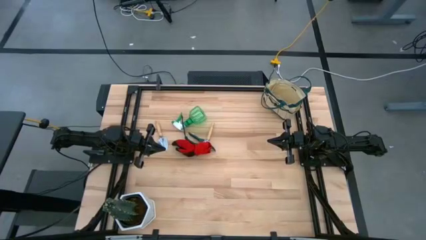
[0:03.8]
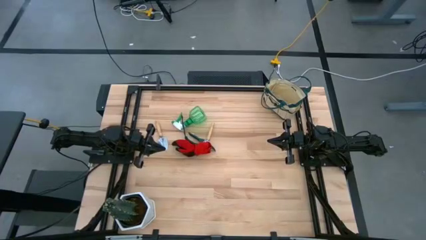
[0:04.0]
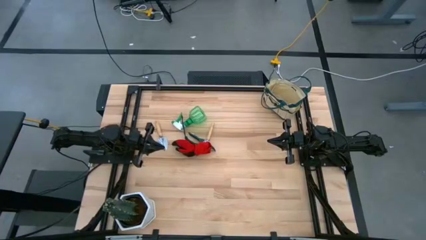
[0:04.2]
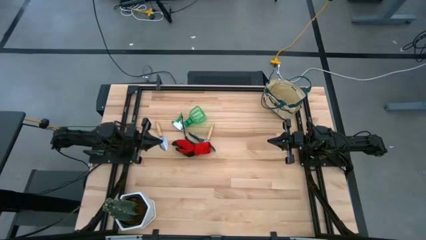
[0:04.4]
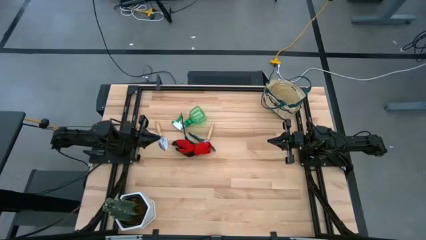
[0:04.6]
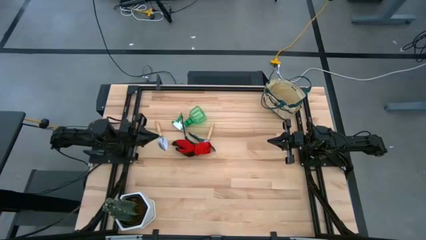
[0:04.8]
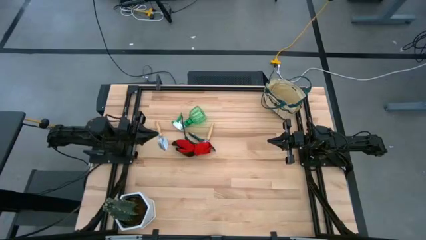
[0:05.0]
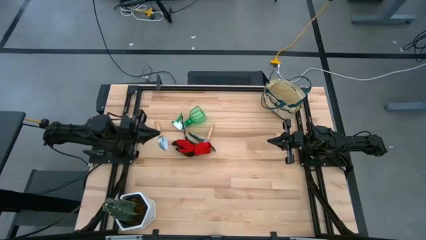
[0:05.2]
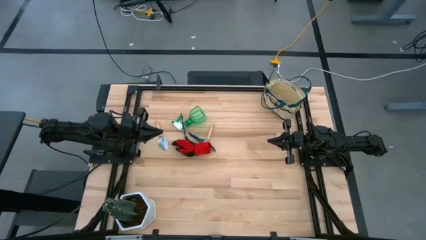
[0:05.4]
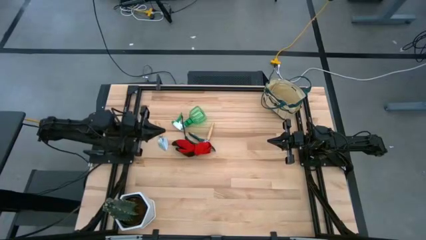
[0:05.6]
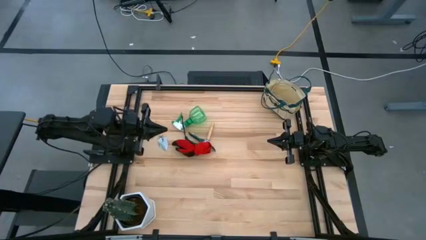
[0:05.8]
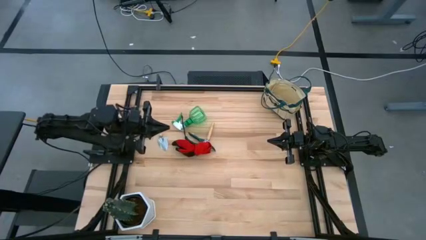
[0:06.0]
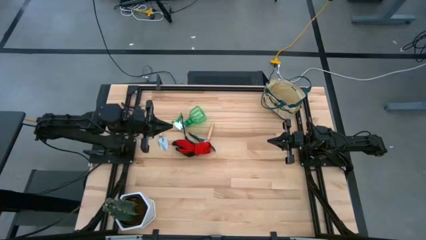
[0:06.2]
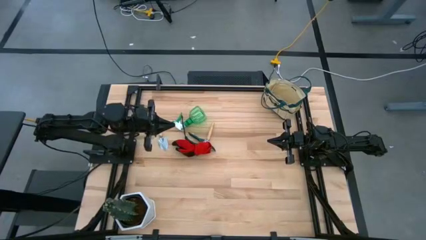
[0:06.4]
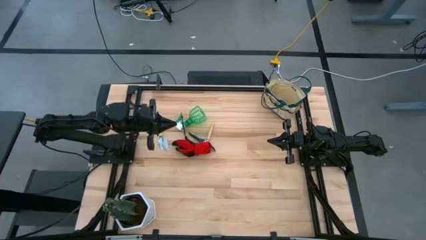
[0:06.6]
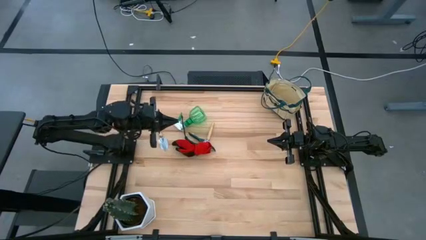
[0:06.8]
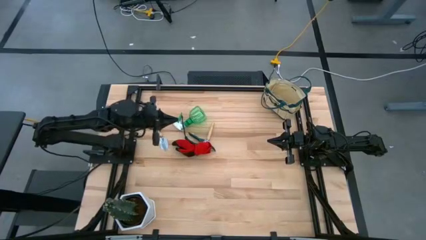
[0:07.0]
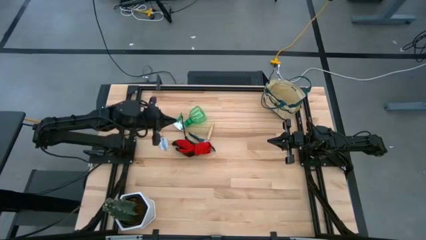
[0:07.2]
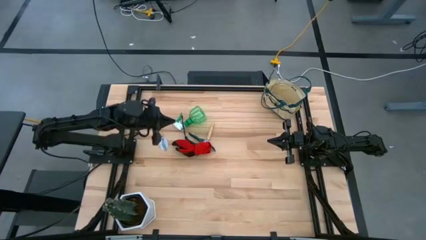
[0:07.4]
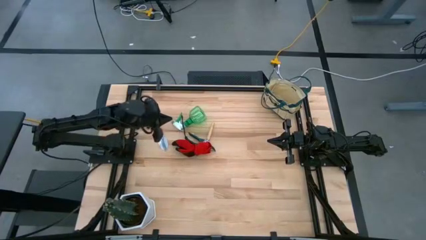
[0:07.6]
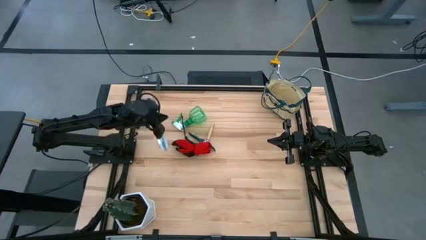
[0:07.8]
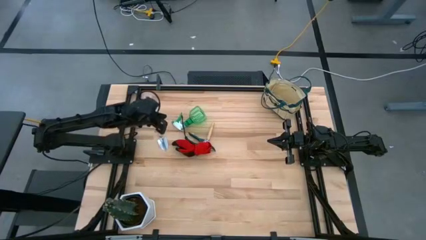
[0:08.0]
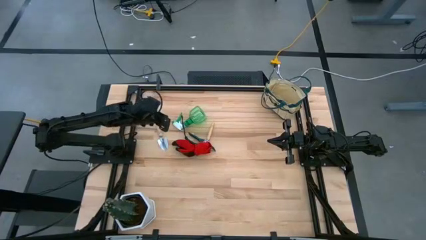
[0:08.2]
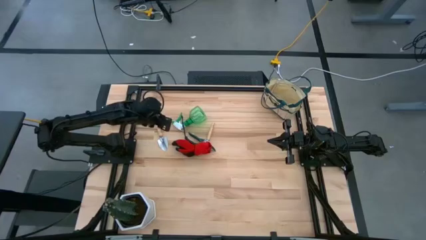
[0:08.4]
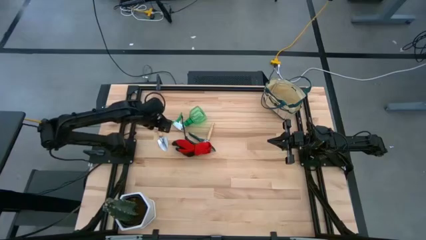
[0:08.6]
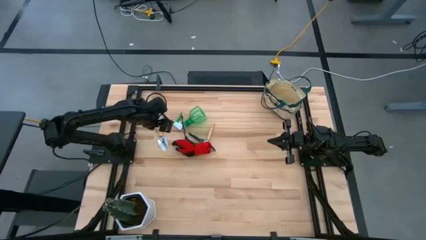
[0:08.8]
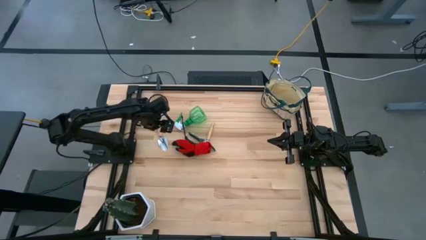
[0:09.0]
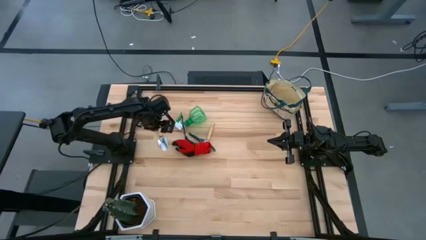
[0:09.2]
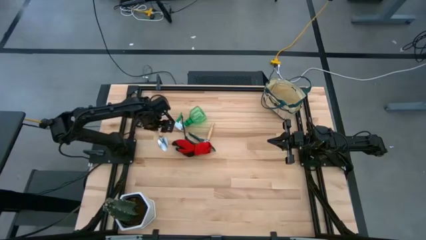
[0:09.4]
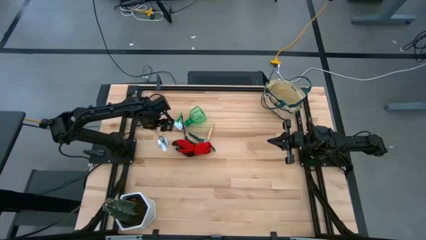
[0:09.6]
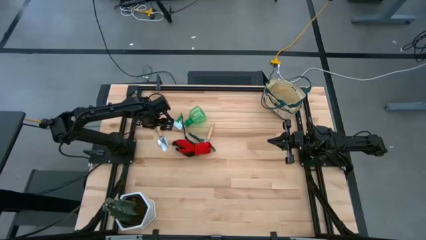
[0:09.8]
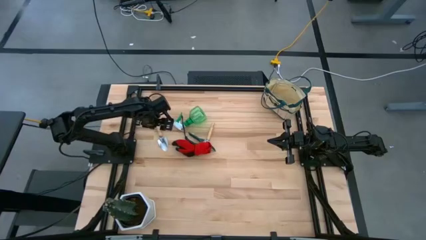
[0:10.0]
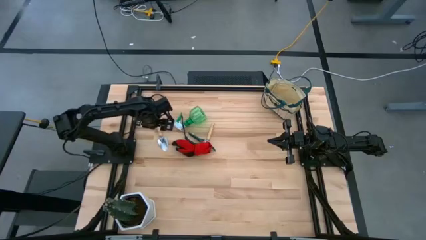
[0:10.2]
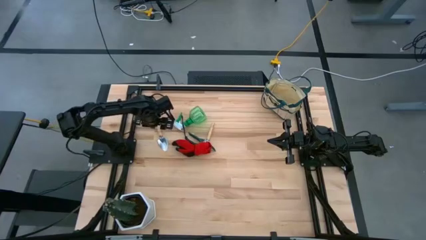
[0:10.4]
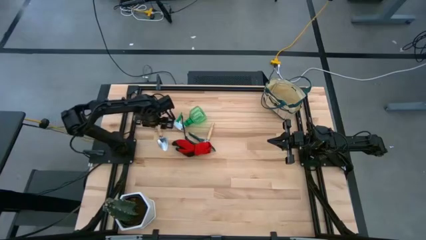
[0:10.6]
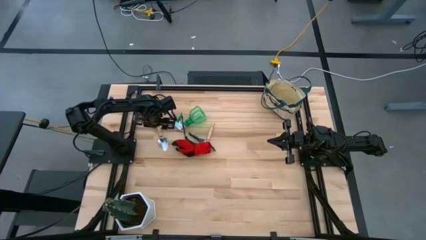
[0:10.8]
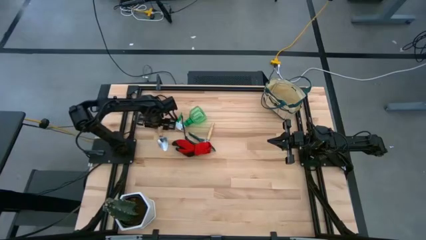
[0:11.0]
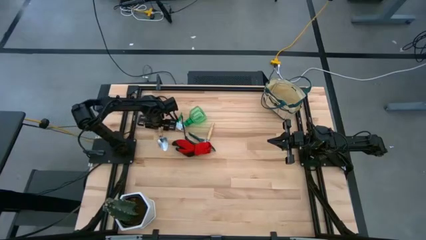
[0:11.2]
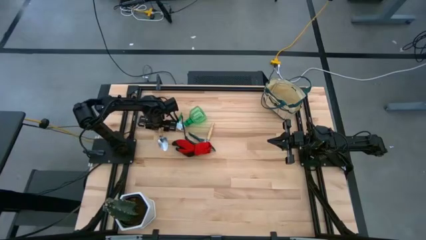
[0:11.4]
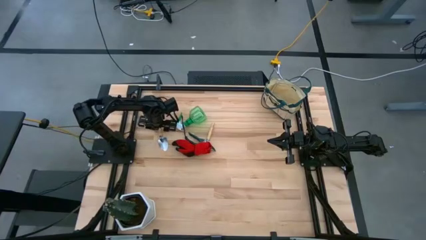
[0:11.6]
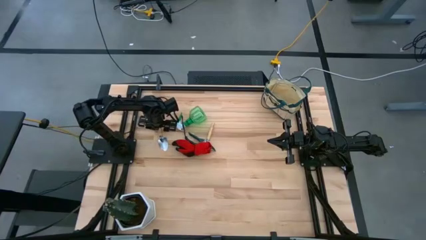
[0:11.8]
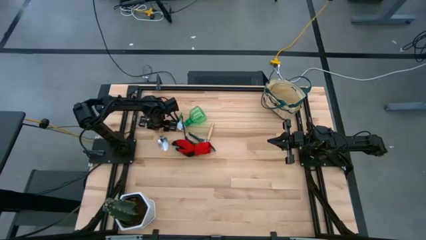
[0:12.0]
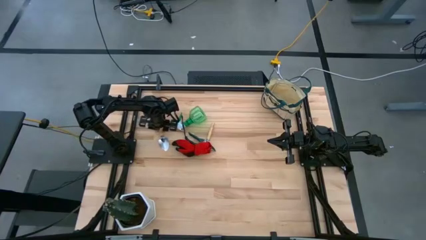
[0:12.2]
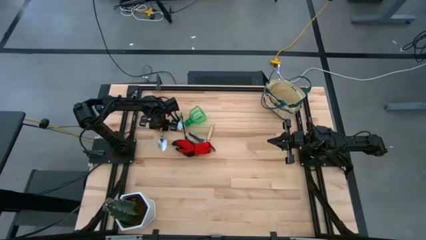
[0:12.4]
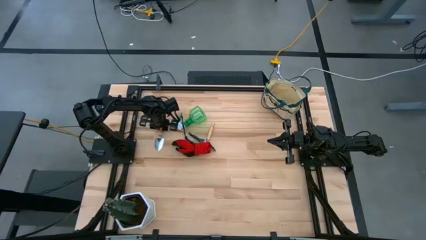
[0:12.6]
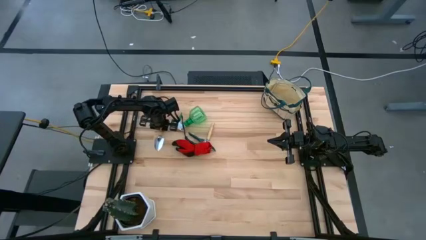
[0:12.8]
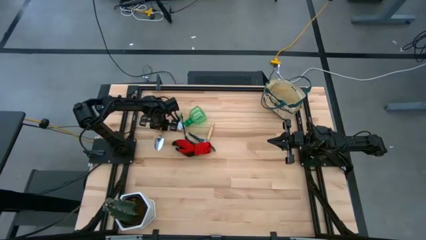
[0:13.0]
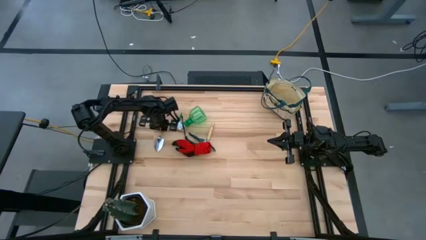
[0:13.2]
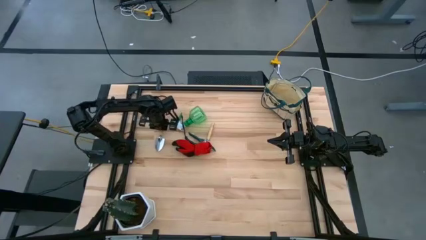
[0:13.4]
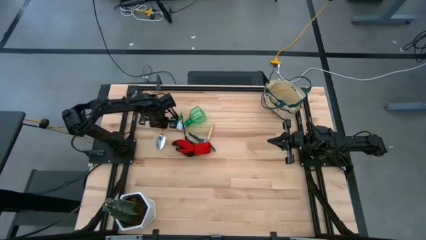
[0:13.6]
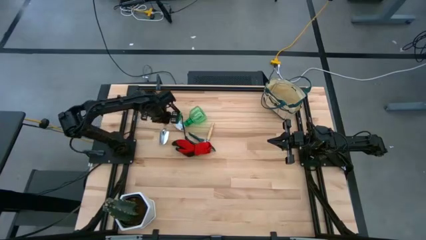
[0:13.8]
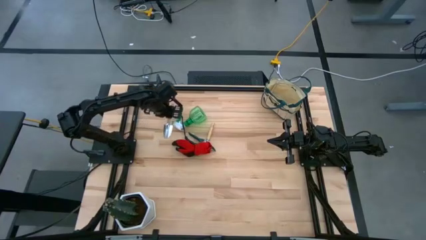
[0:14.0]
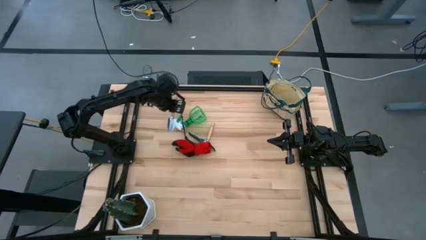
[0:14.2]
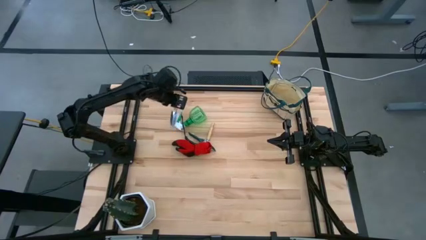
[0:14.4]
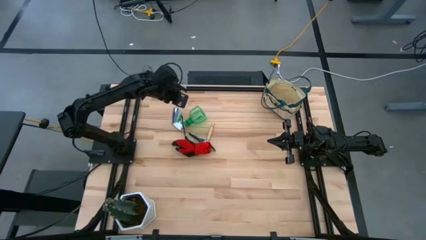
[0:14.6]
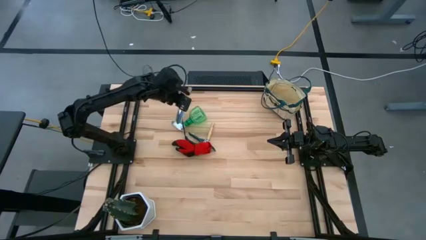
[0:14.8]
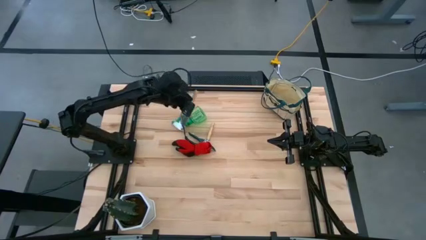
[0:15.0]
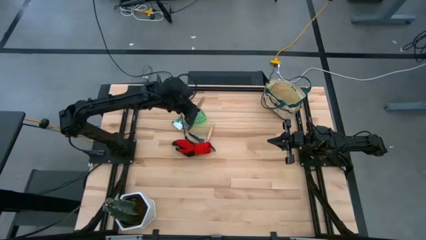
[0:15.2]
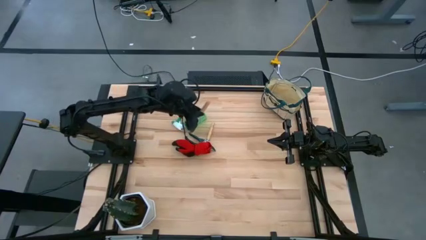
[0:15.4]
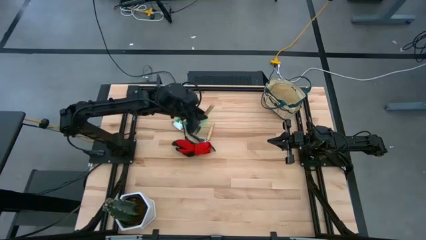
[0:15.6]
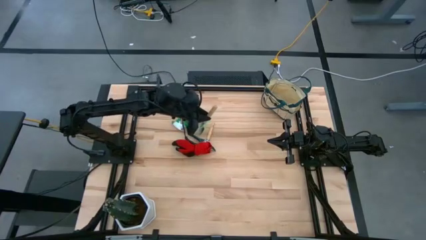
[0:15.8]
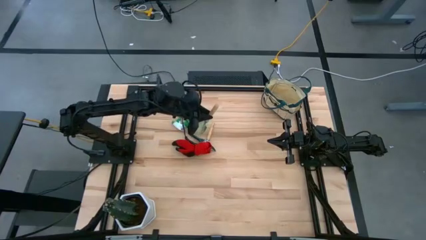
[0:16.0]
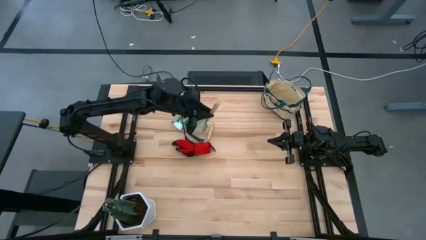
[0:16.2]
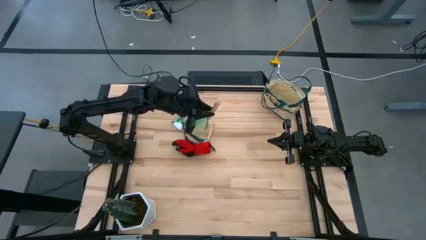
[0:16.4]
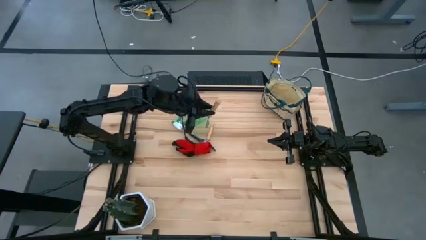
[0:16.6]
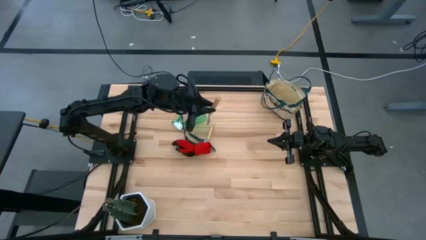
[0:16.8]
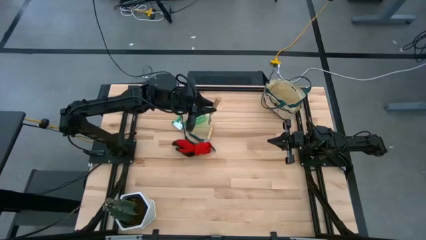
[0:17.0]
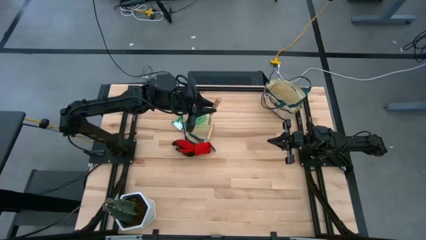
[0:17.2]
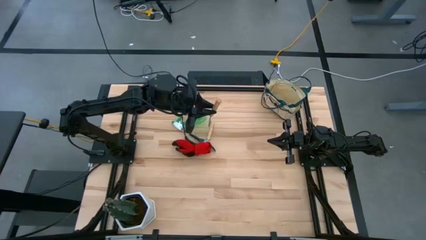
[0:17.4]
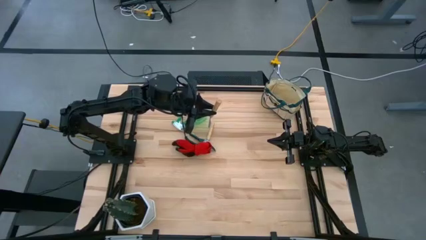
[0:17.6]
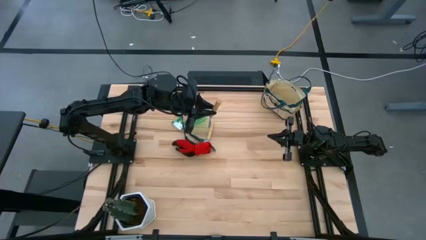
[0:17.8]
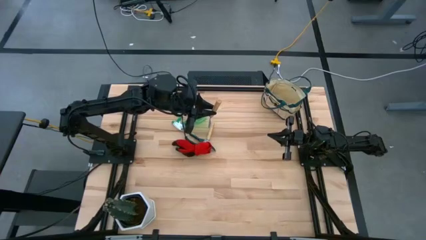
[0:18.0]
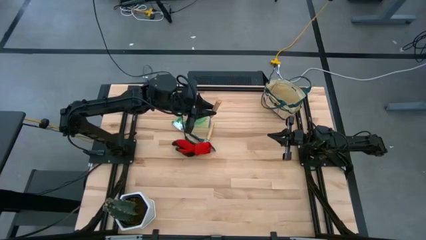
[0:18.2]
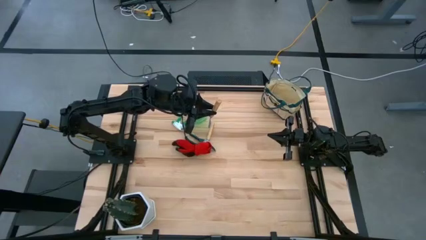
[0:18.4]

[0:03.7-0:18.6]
Task: Pick & Place Garden tools in Gardening bag
Put the left brown trowel into the gardening bag
